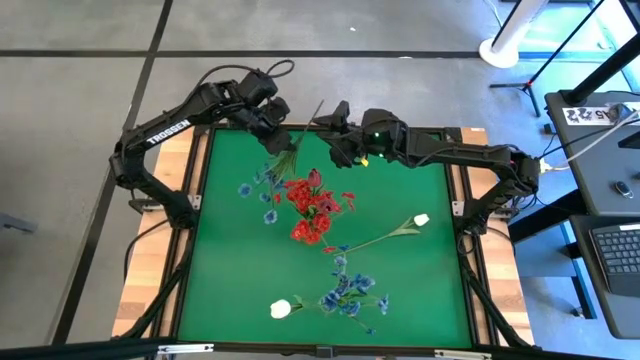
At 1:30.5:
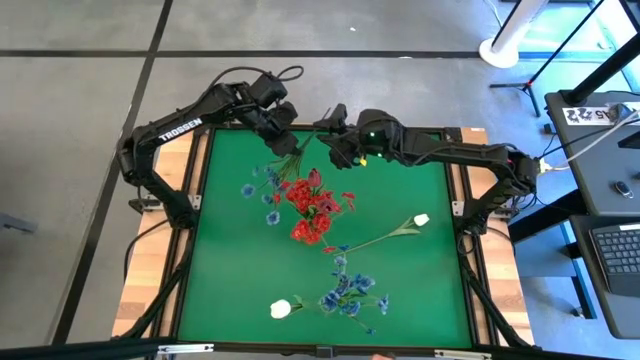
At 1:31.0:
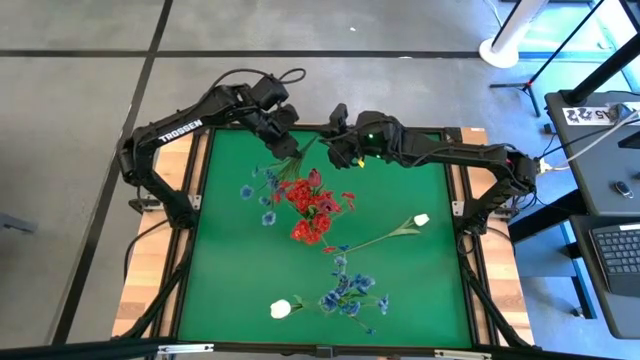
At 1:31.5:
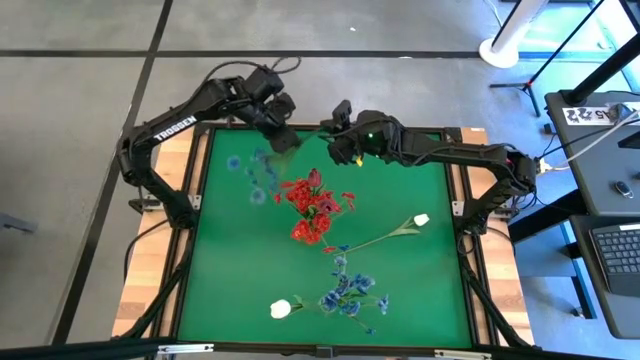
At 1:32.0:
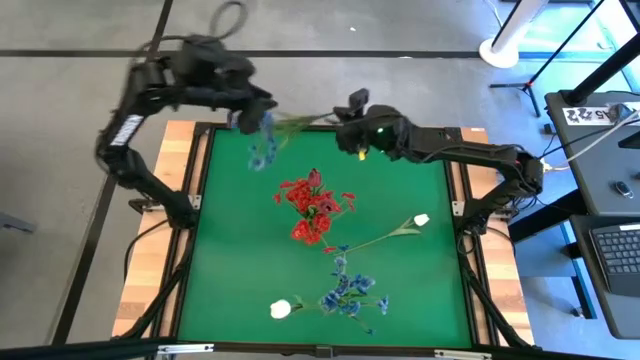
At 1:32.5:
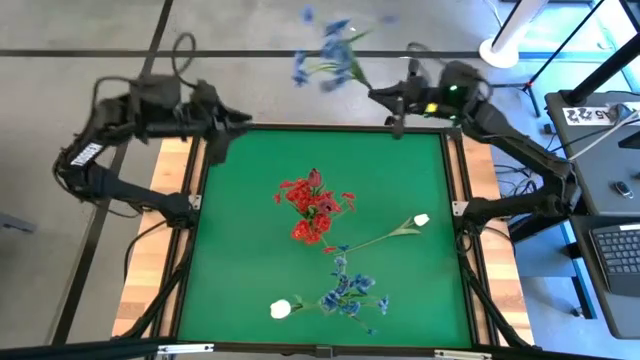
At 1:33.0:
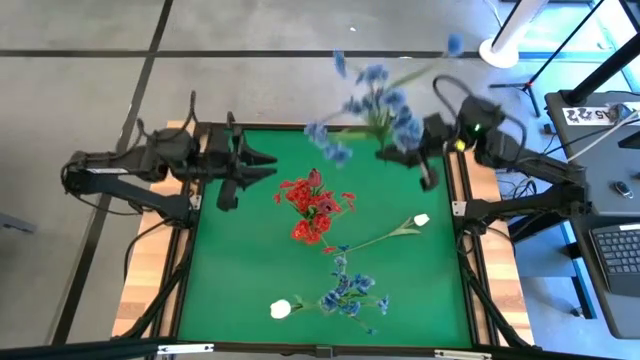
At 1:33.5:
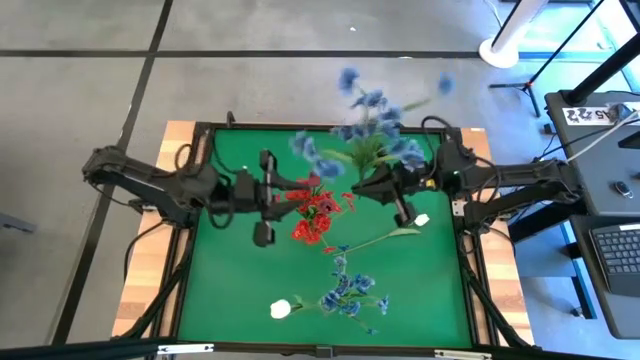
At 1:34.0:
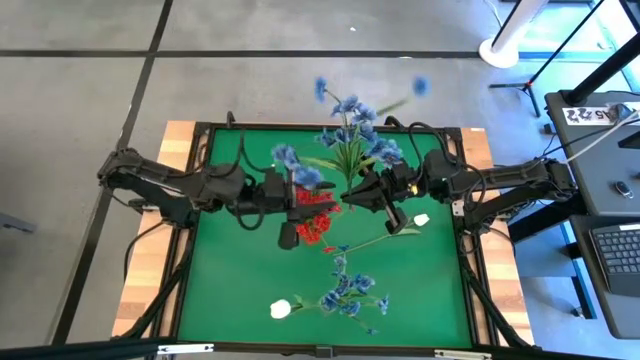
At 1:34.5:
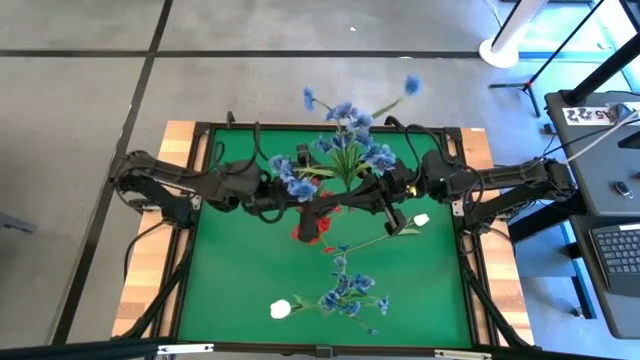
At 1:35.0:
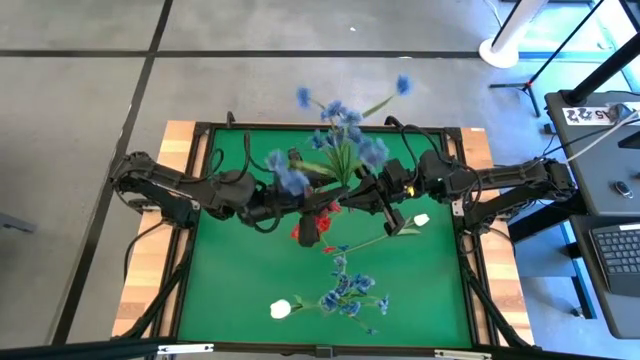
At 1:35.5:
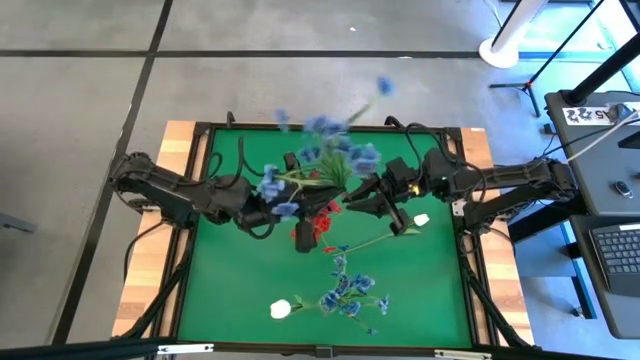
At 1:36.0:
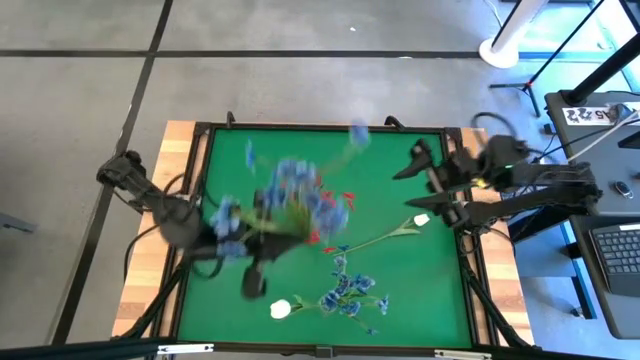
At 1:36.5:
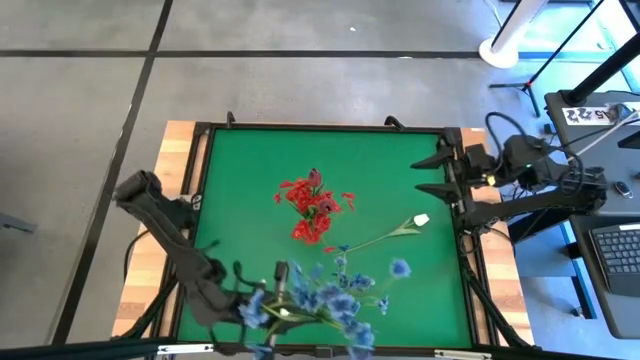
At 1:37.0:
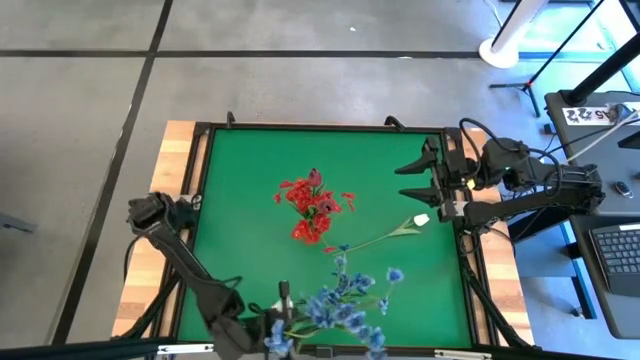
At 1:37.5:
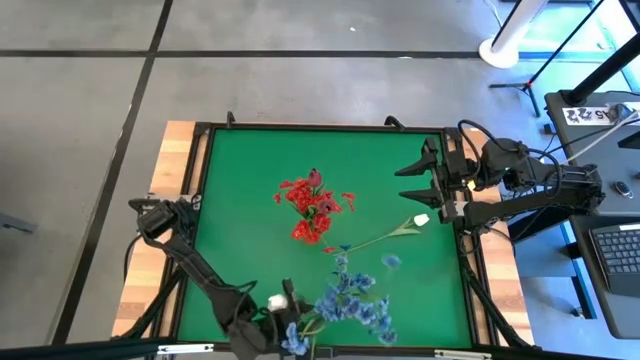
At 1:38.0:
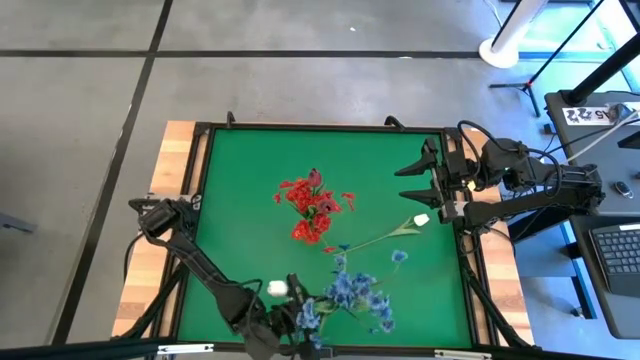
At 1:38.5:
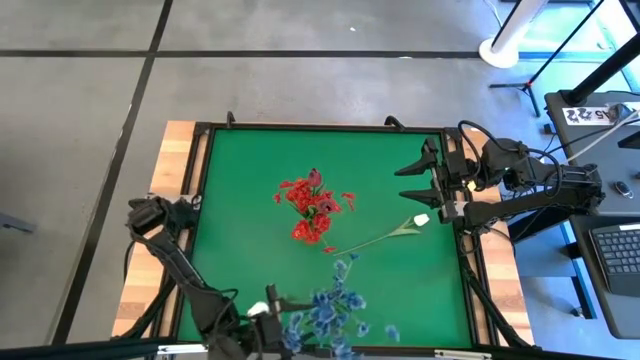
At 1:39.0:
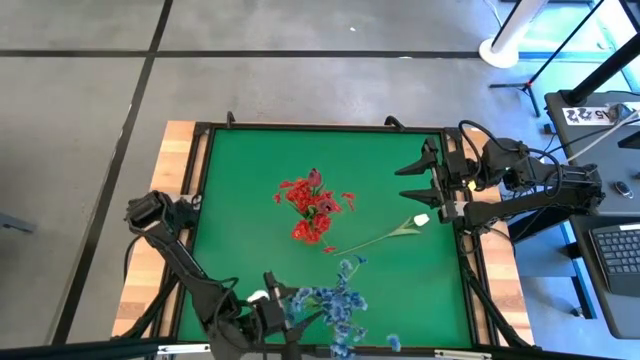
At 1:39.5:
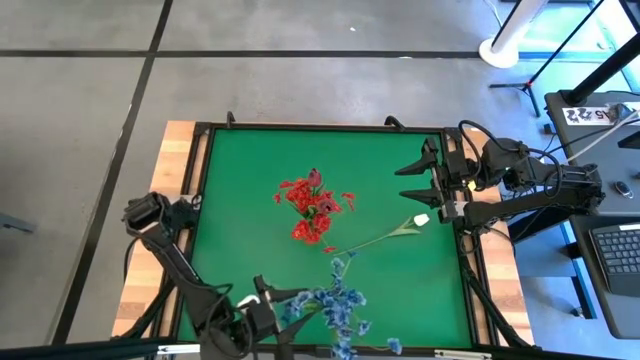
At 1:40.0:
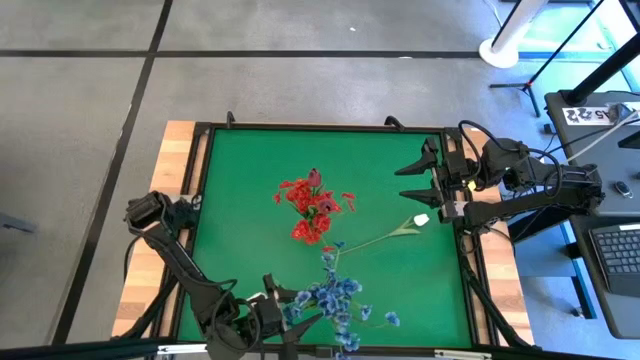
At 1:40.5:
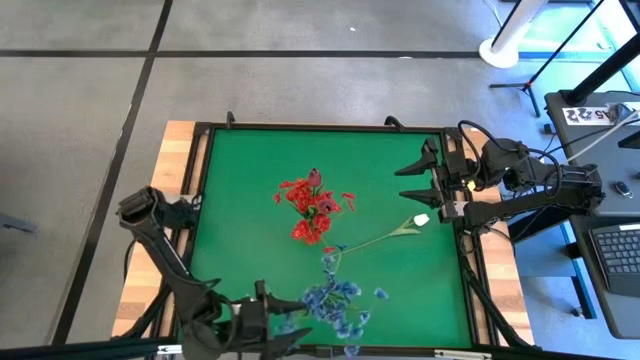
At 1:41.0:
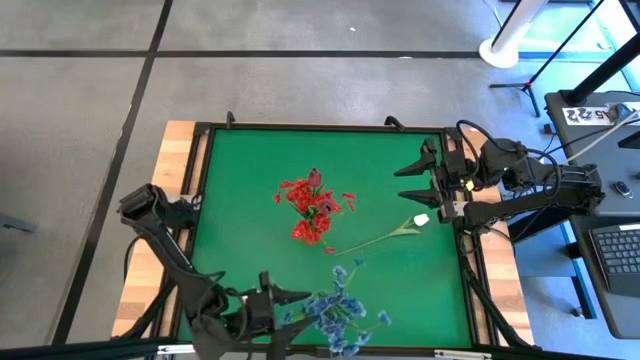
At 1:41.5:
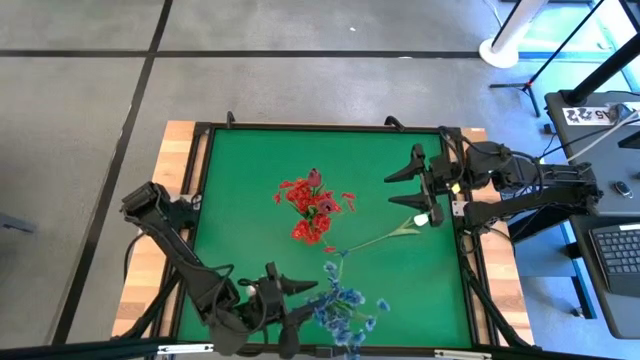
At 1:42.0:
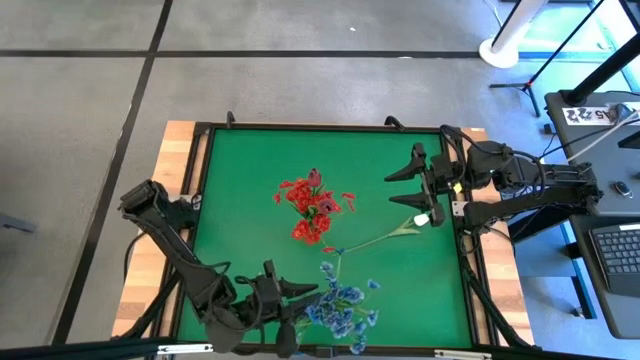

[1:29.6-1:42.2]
Task: Sort flowers into vase by color
Put the blue flowers into the transparent vase

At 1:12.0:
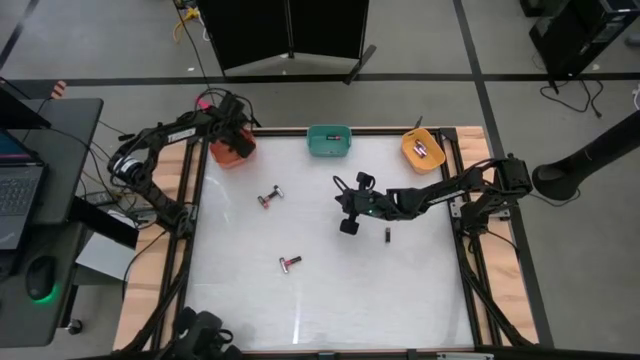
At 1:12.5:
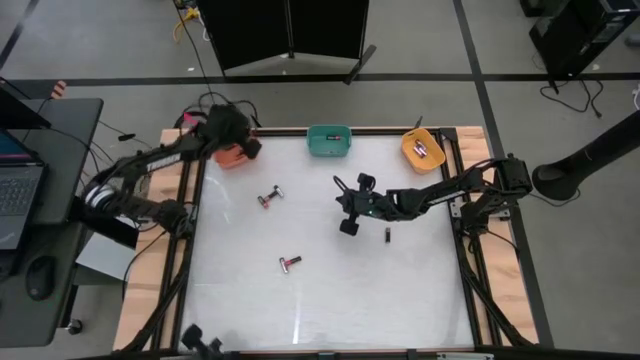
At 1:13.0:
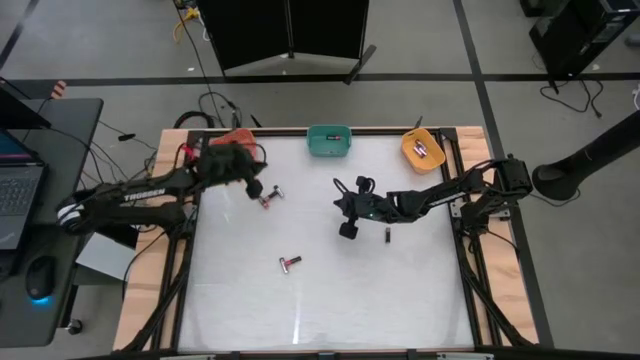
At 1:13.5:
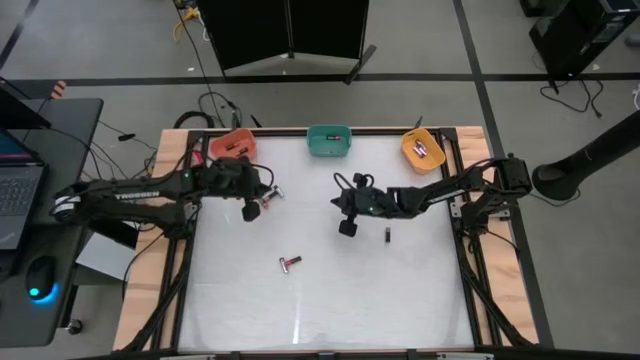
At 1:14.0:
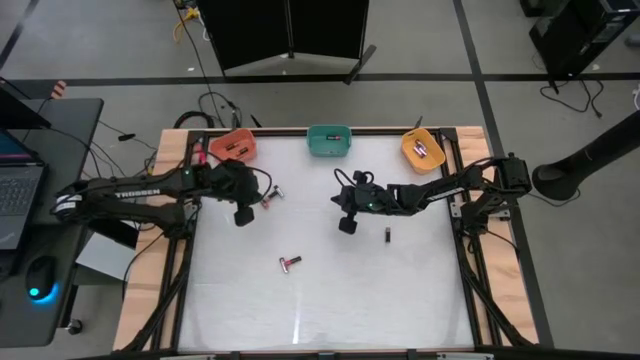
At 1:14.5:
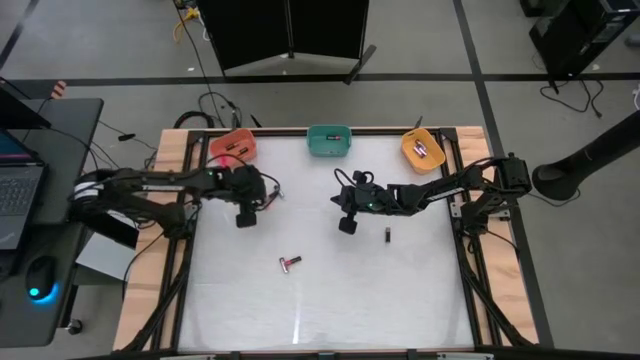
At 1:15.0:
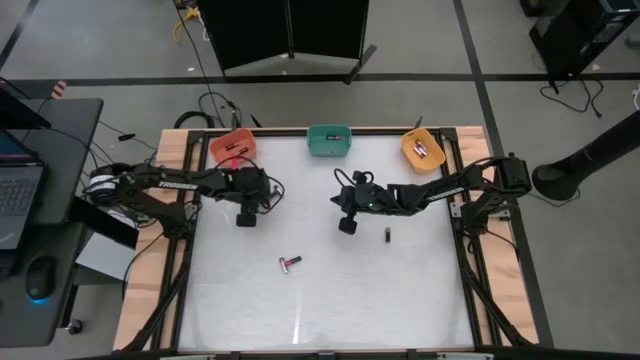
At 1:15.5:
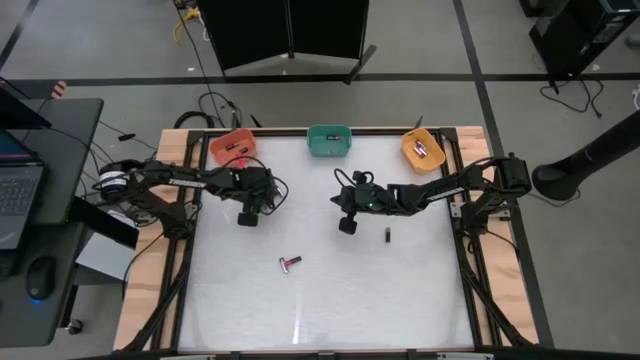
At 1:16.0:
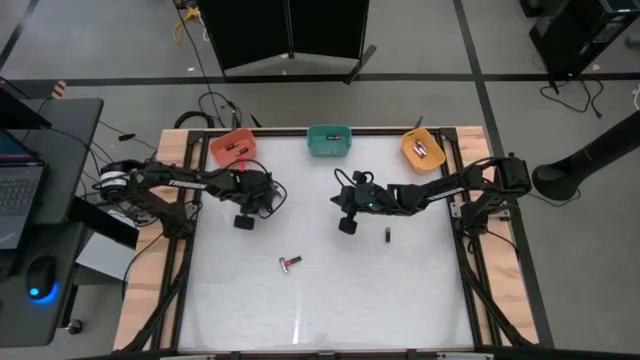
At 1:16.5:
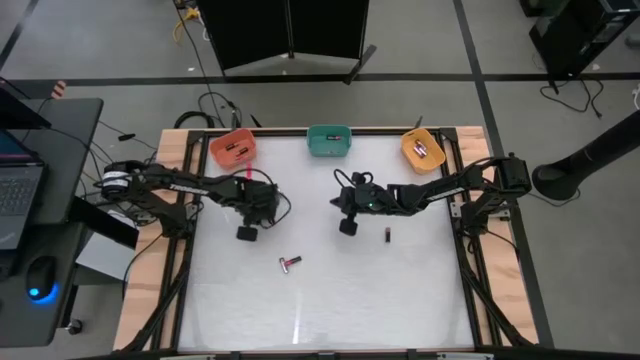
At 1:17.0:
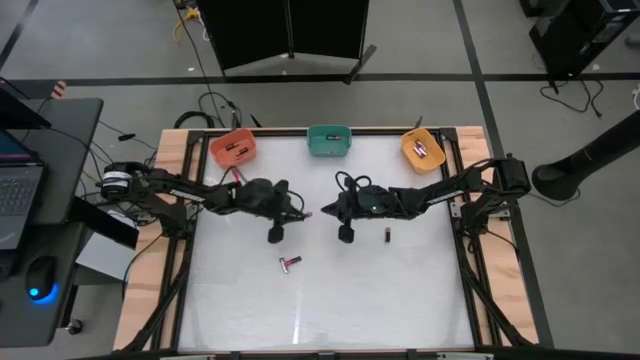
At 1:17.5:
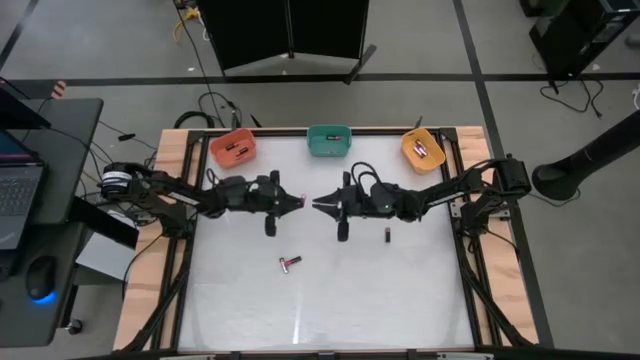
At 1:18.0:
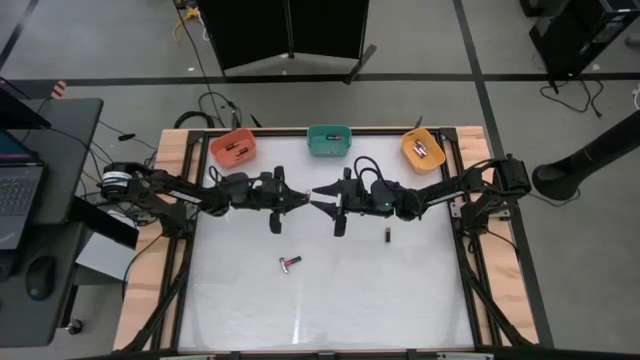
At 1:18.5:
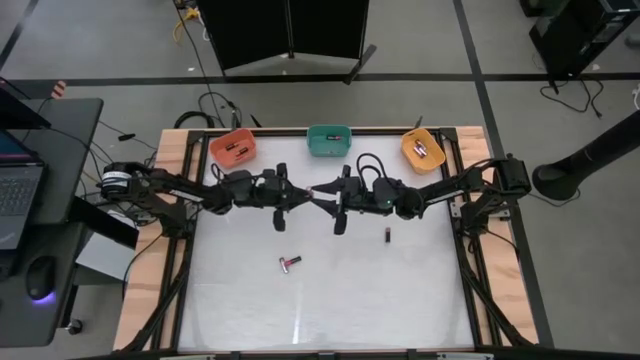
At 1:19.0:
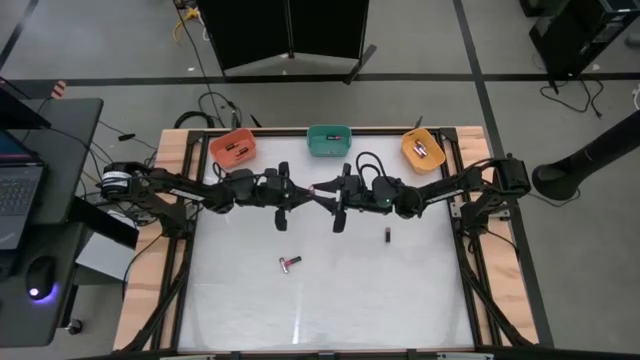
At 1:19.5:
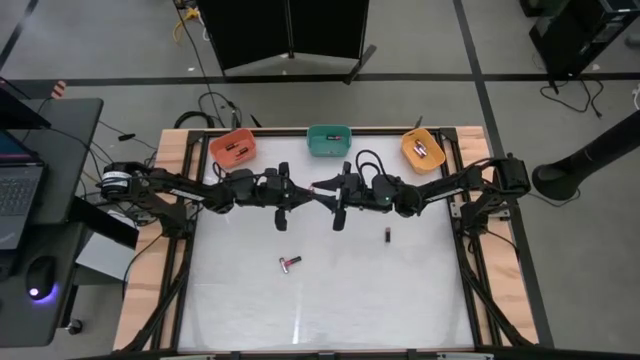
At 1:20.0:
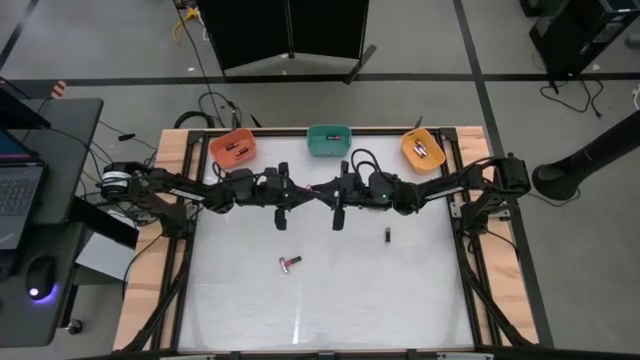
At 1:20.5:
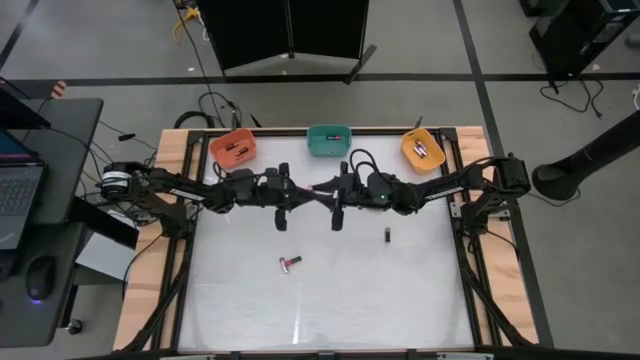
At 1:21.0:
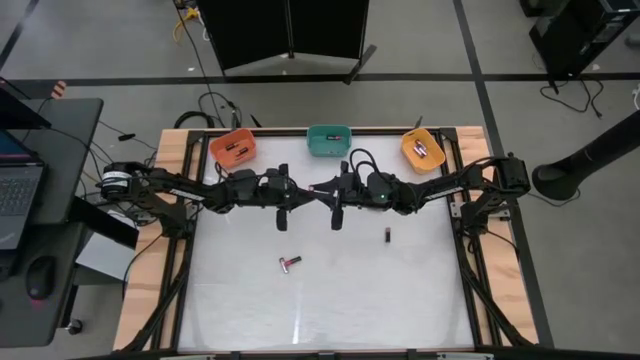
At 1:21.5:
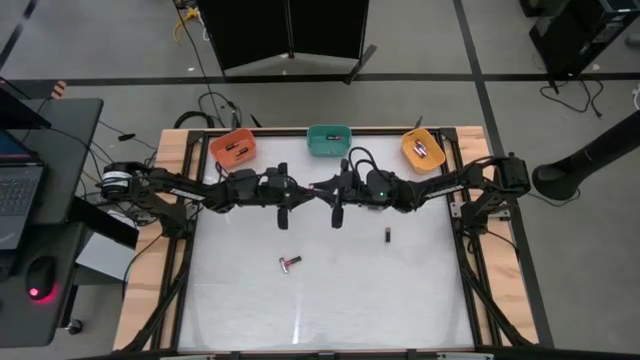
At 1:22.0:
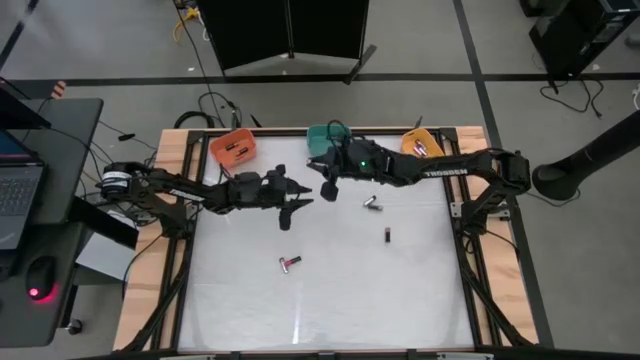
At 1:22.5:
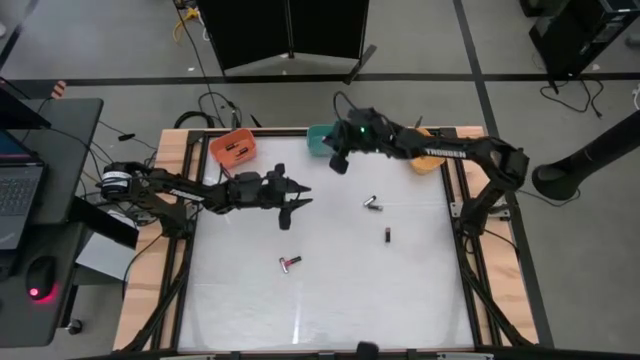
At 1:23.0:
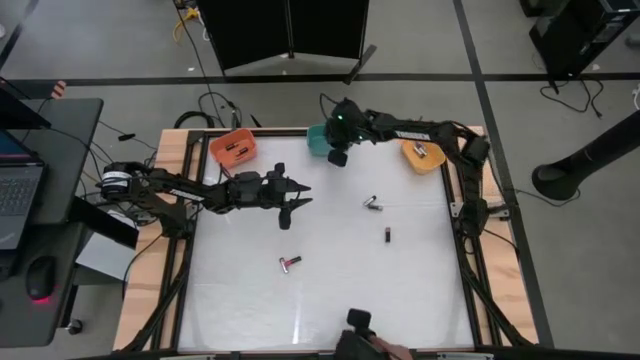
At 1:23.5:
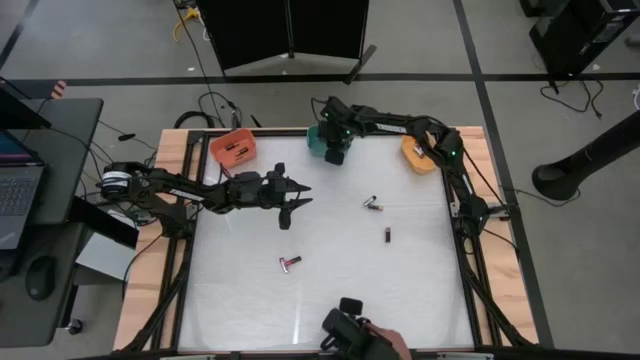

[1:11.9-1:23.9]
Task: Sort batteries
Put the red battery into the green bin
